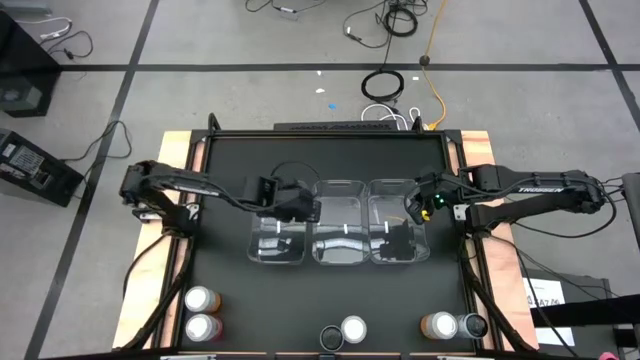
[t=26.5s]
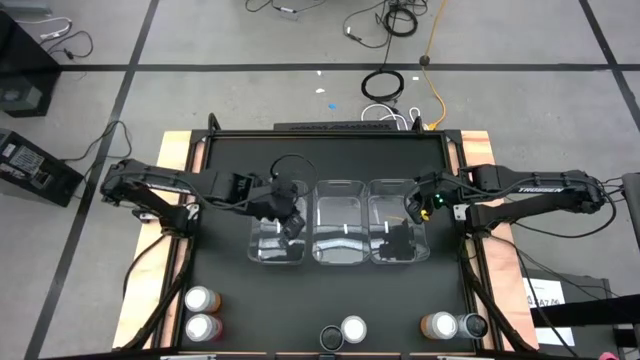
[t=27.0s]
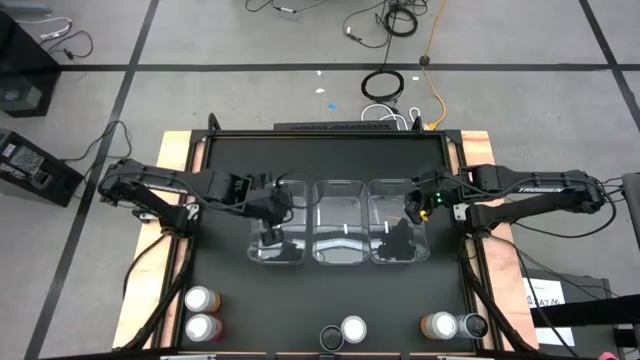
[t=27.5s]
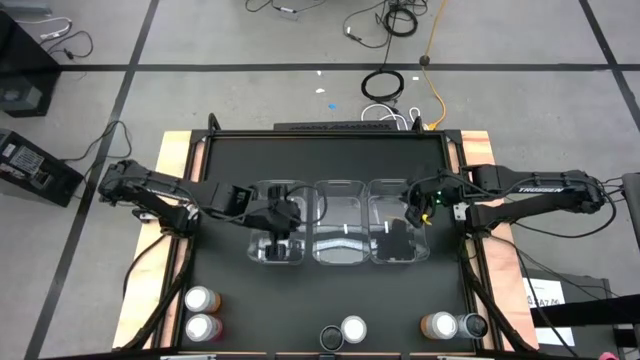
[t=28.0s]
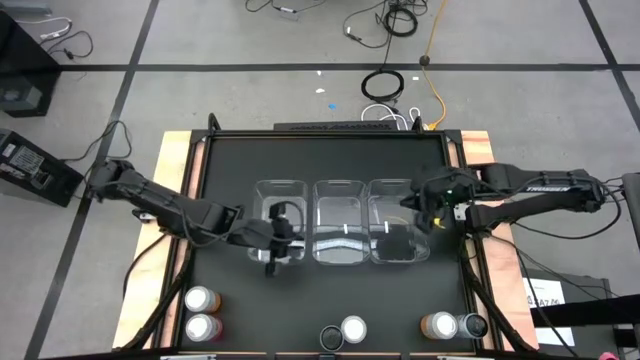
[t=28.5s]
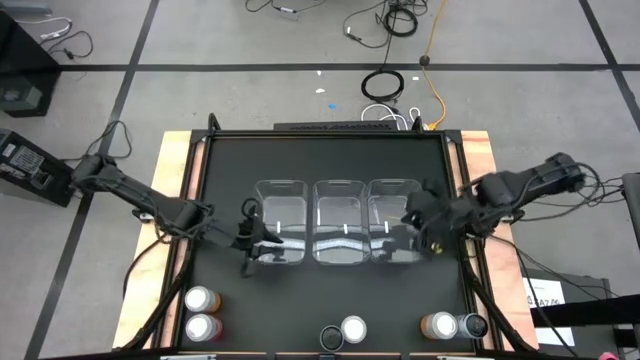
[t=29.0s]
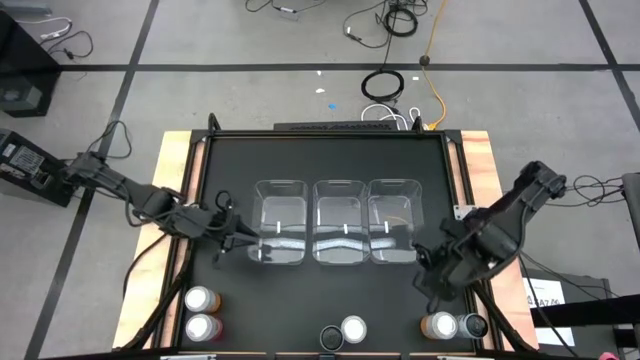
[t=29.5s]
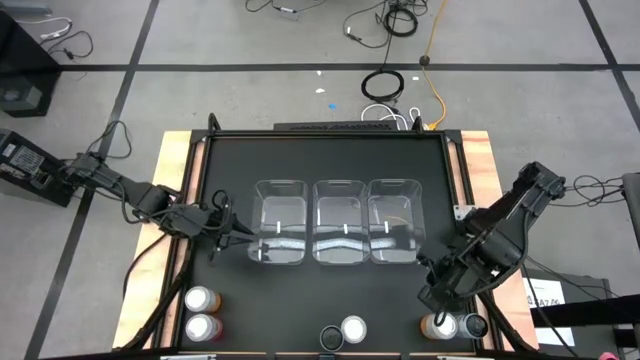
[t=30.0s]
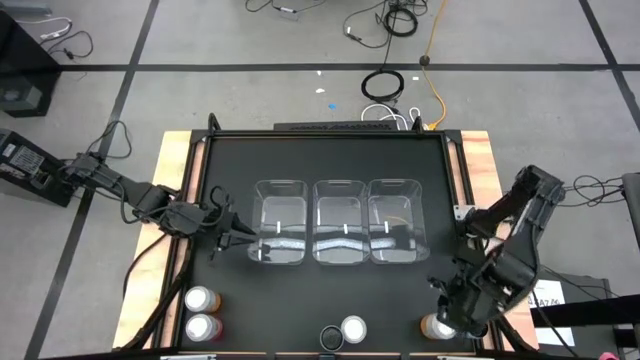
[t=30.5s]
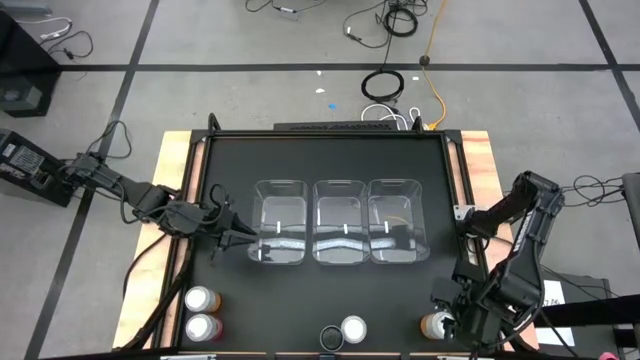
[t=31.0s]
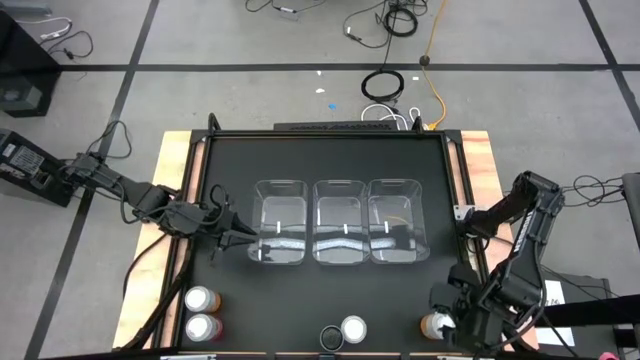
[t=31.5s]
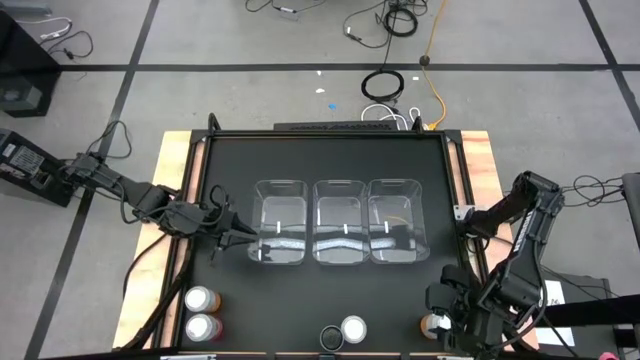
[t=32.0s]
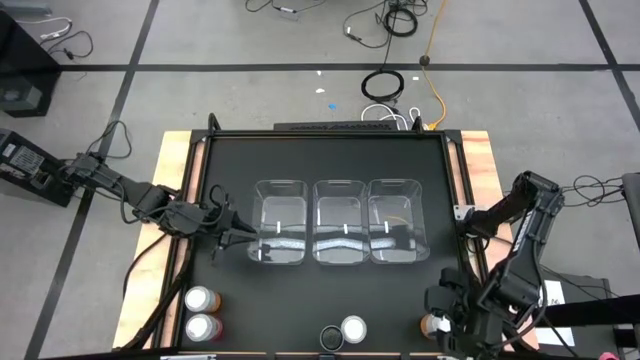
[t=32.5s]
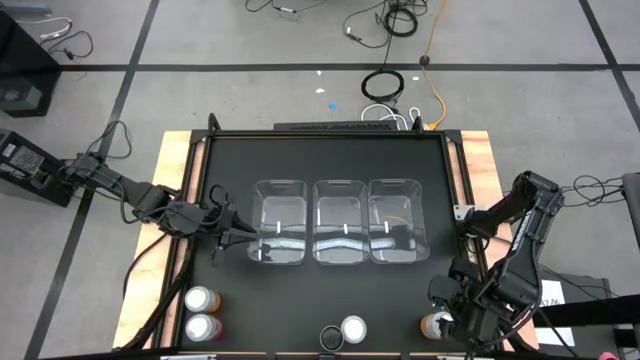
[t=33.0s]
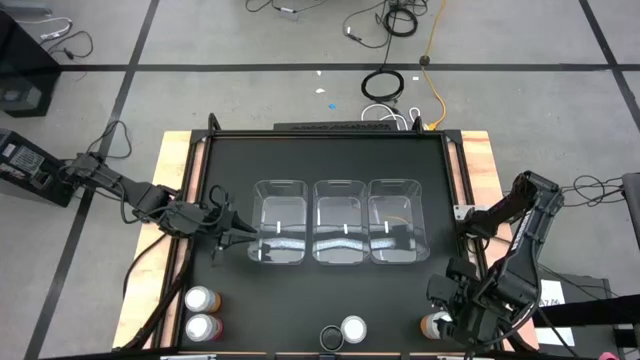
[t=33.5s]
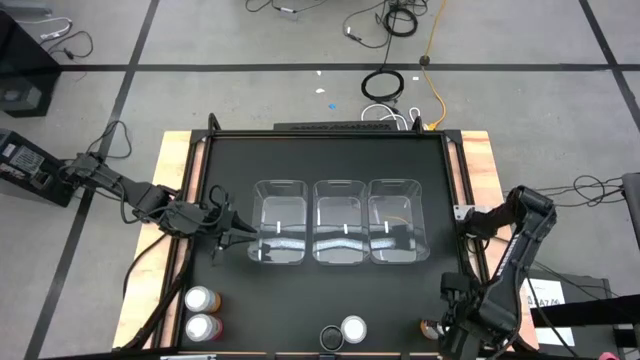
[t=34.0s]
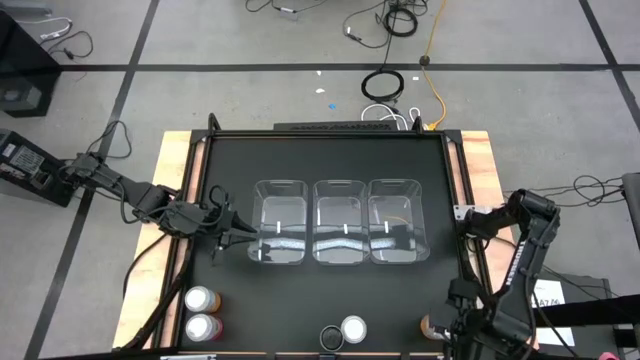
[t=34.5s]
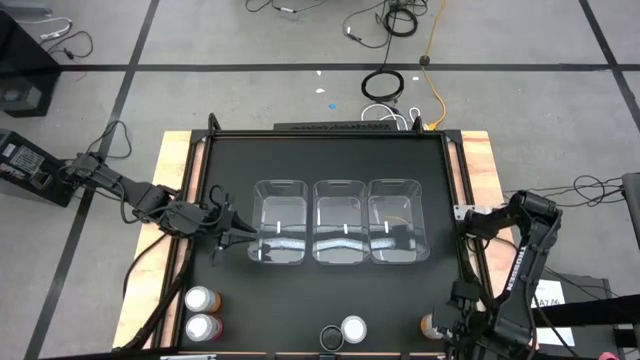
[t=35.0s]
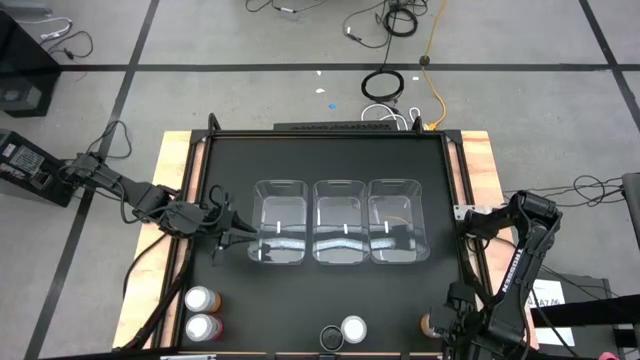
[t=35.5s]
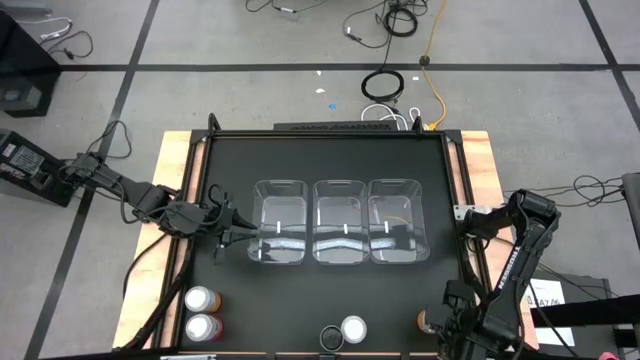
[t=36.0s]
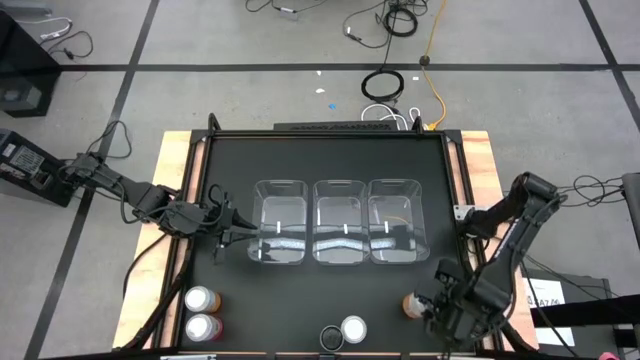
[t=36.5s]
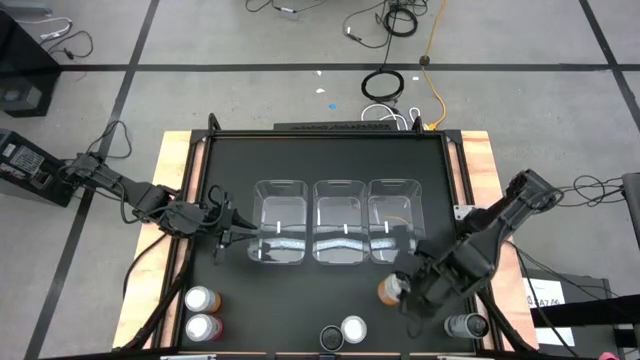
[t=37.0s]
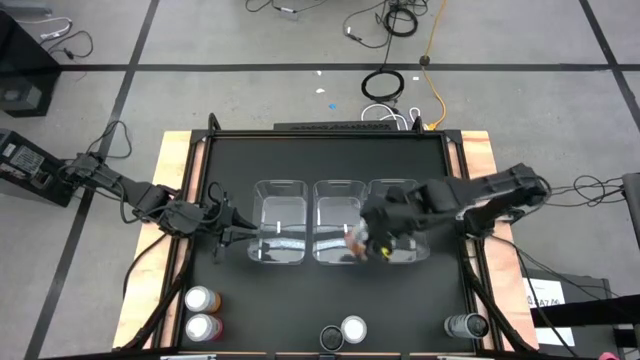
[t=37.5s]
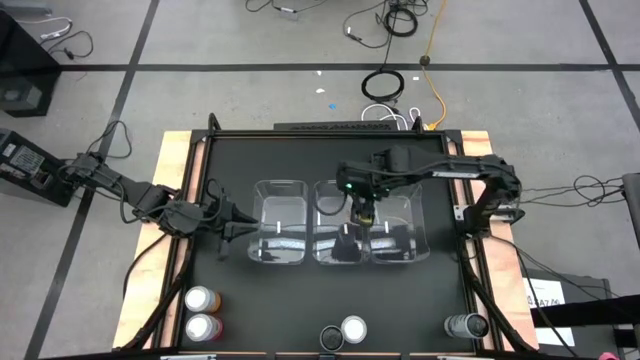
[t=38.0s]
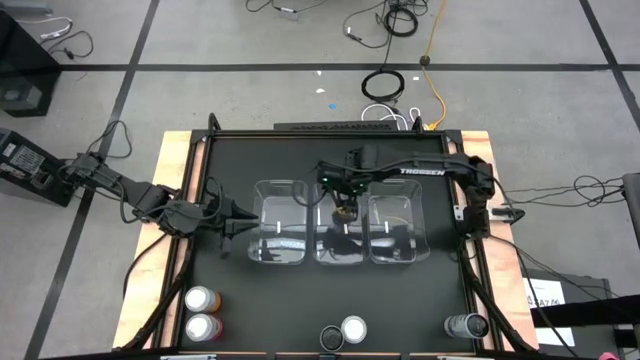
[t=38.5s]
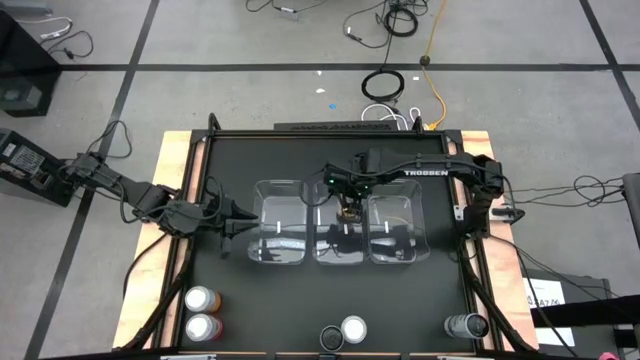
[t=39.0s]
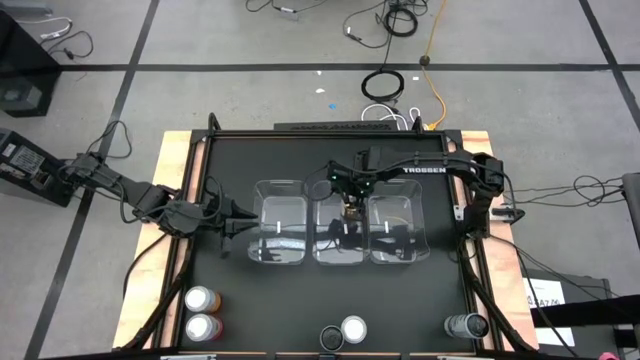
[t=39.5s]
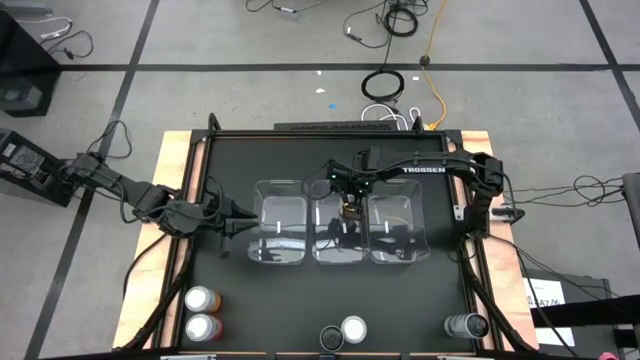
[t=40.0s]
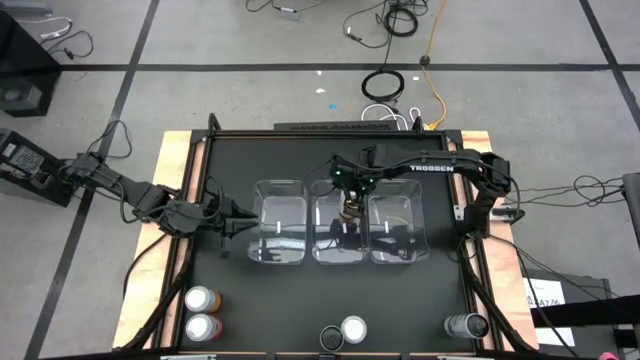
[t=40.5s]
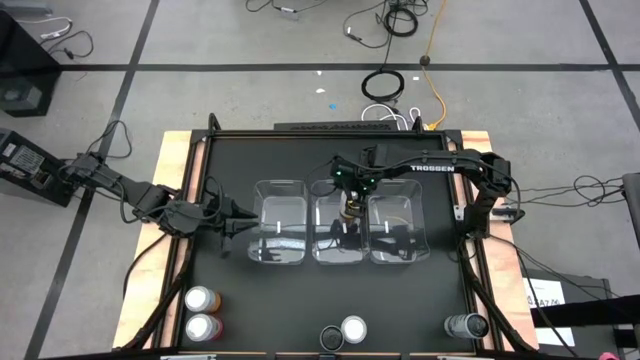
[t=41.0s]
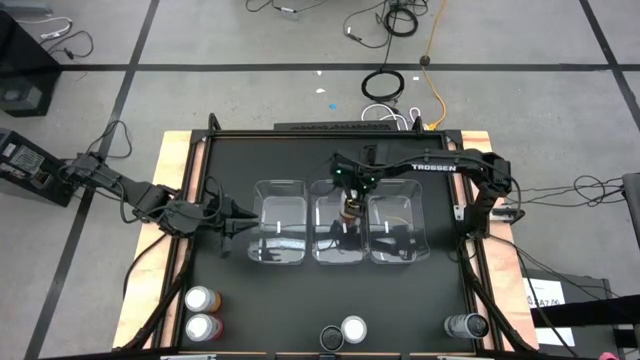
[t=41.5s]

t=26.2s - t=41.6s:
Task: Sort soda cans
Put the right yellow white soda can into the middle transparent bin

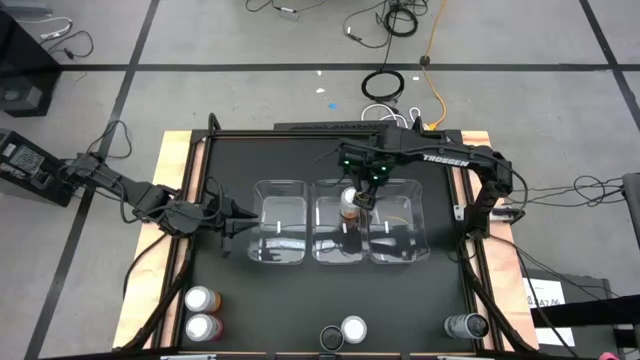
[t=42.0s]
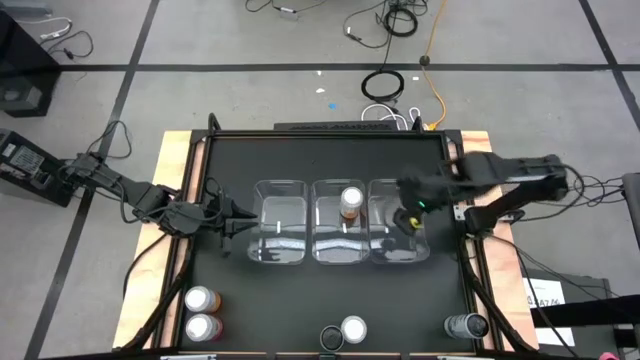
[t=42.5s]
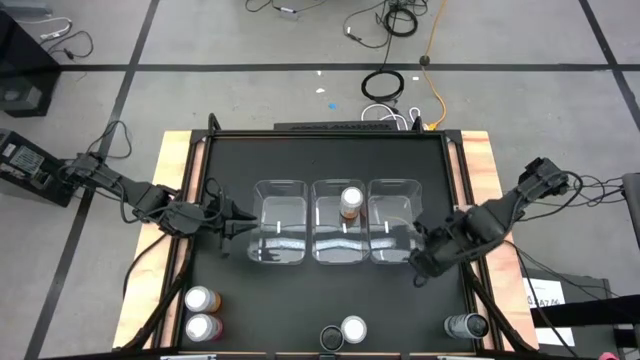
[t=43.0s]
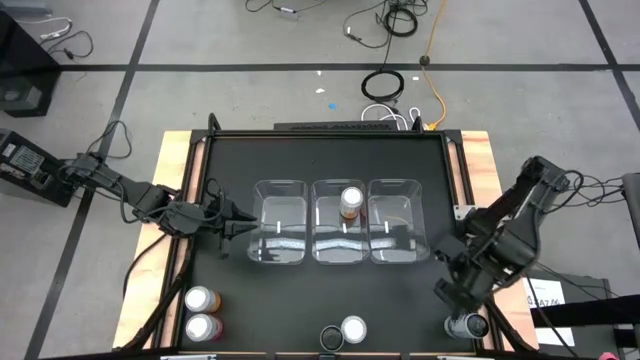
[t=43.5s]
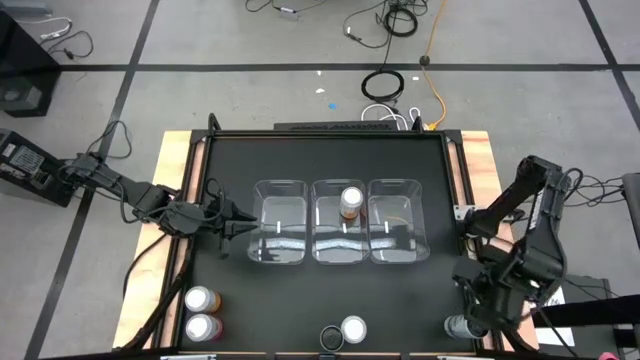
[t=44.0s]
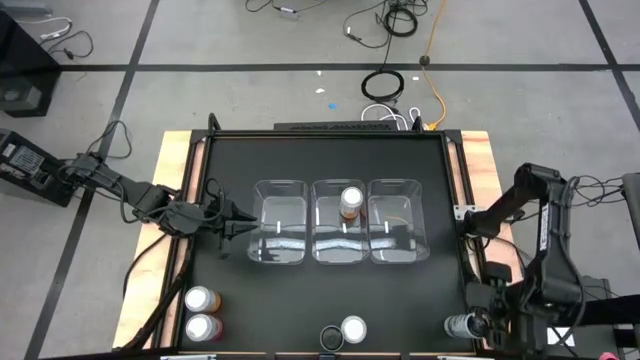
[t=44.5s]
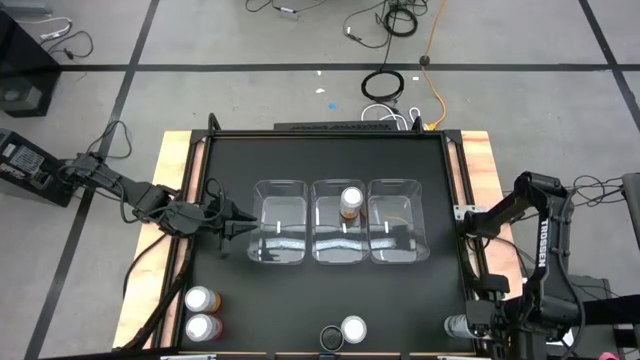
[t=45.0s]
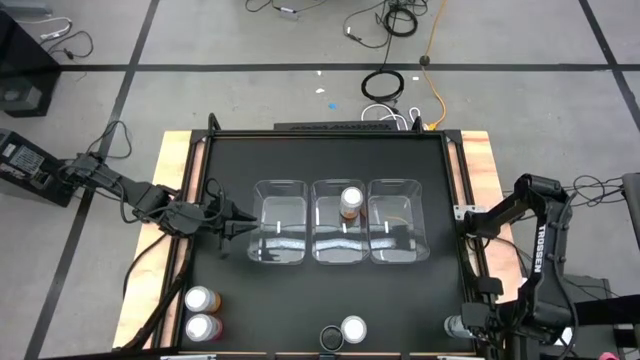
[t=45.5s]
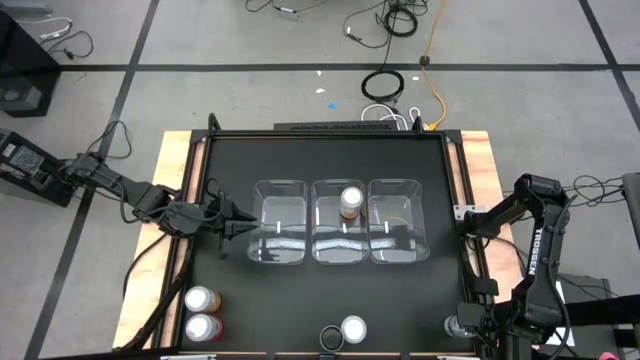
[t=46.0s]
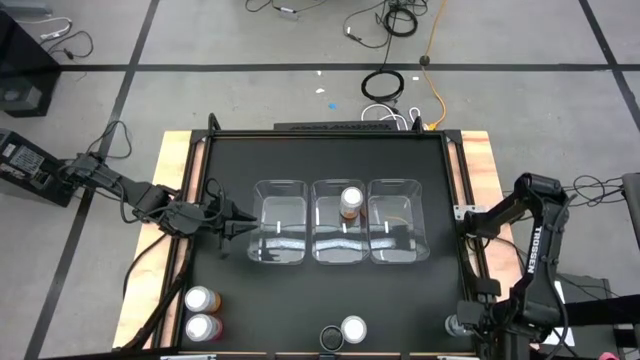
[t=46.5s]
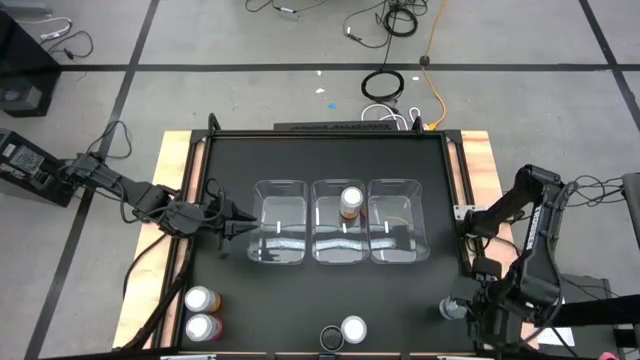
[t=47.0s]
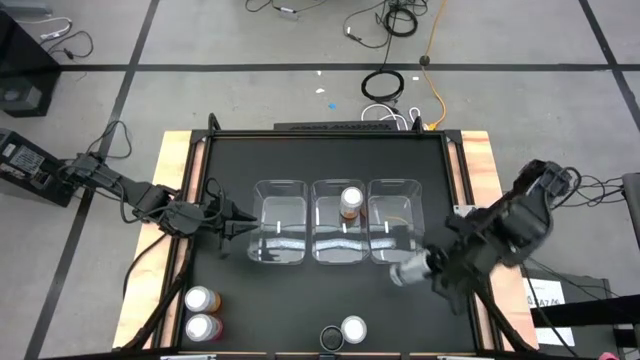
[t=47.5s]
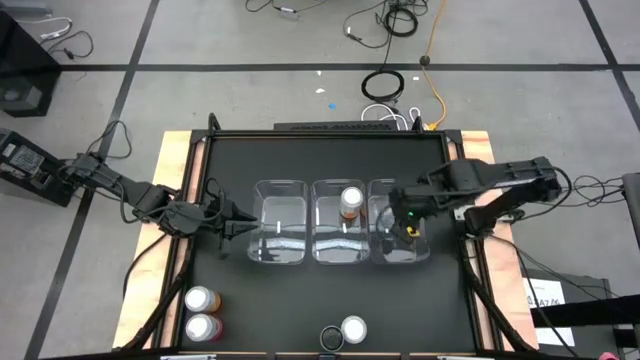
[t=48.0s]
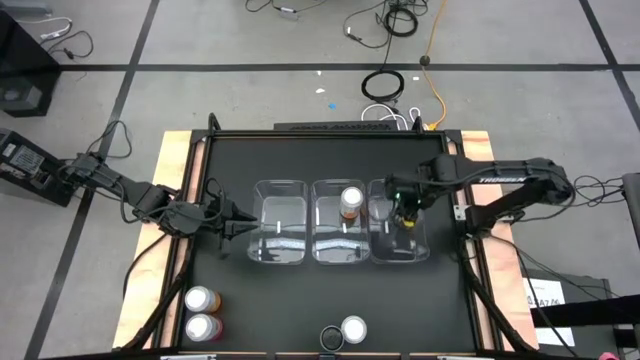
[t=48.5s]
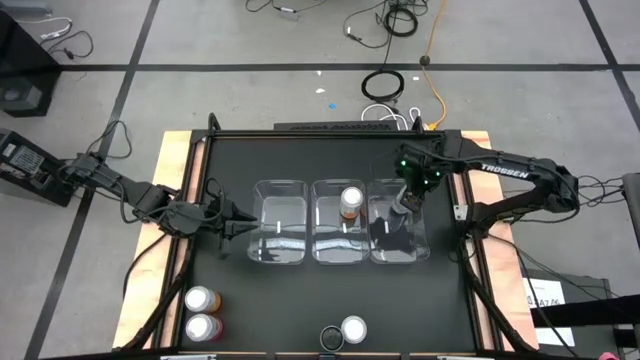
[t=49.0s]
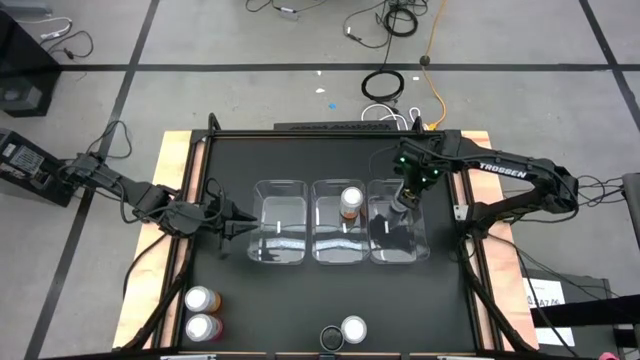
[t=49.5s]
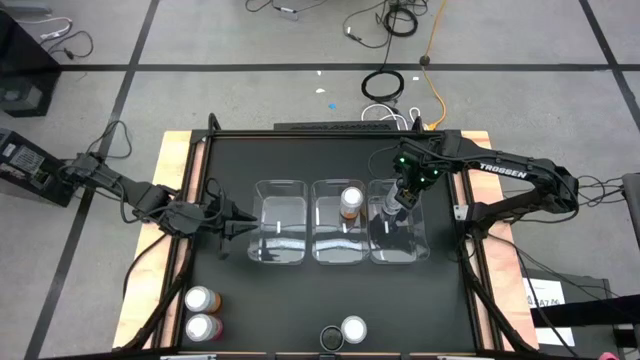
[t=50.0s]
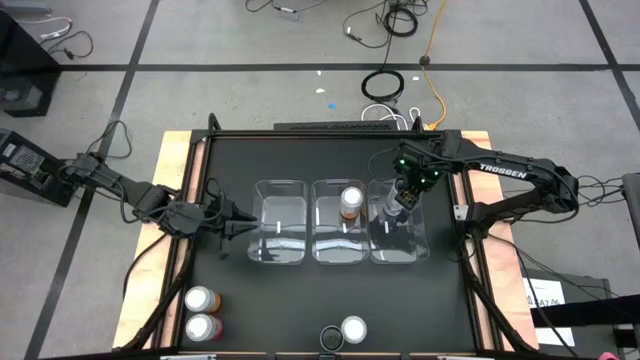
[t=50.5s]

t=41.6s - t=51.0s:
Put the right white blue soda can into the right transparent bin
